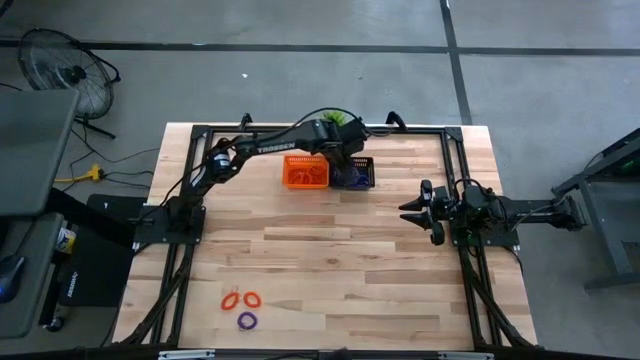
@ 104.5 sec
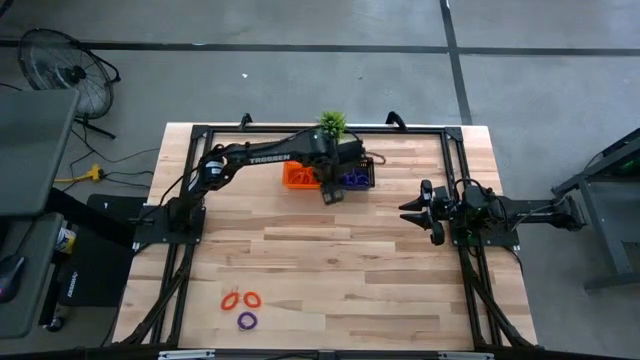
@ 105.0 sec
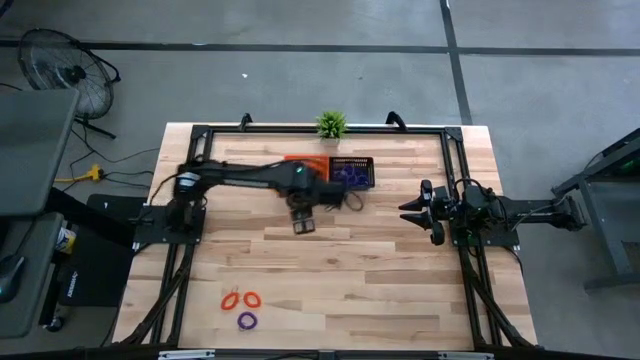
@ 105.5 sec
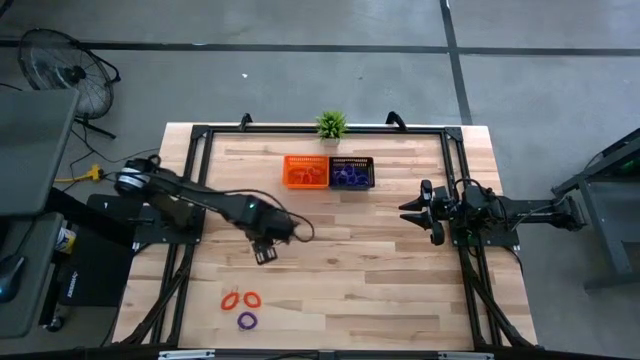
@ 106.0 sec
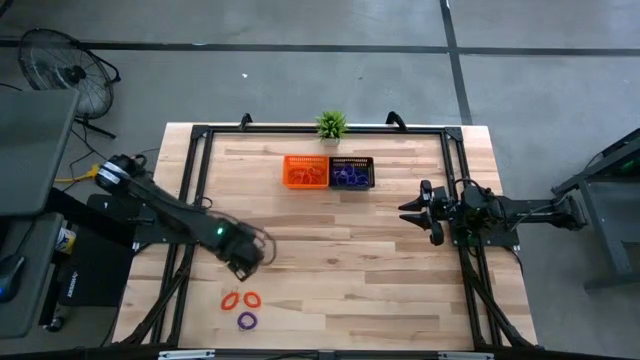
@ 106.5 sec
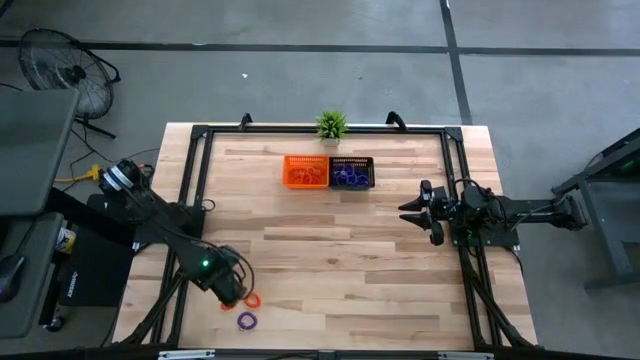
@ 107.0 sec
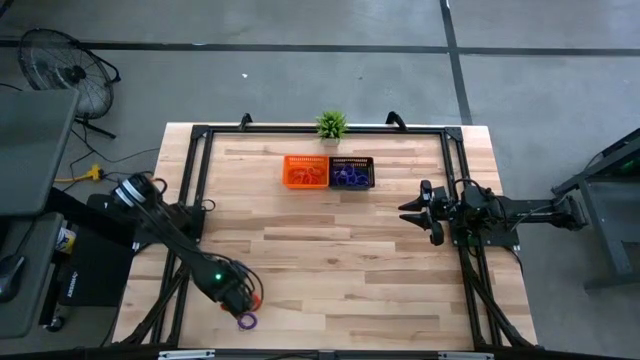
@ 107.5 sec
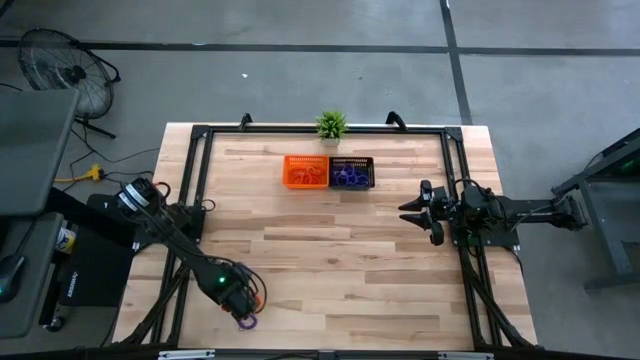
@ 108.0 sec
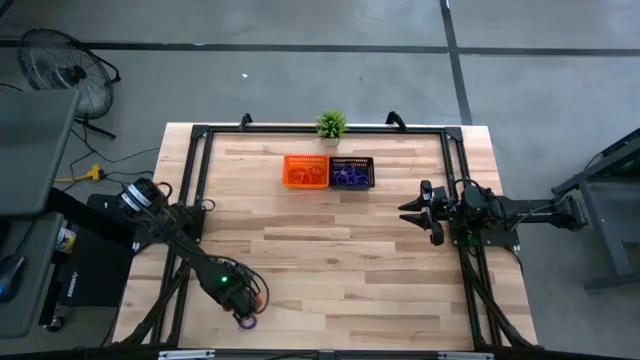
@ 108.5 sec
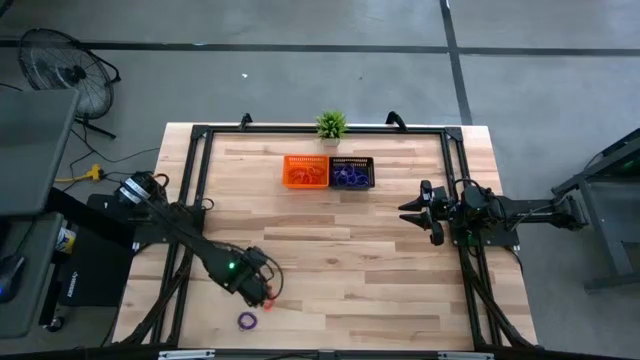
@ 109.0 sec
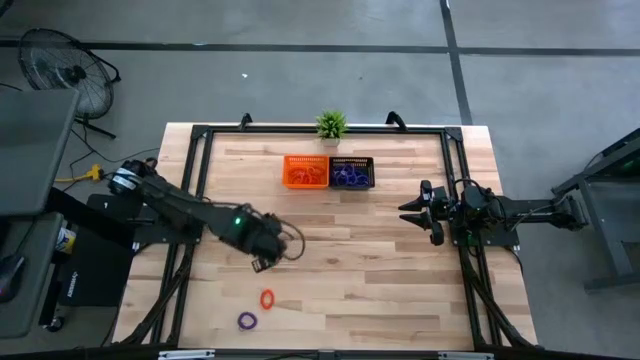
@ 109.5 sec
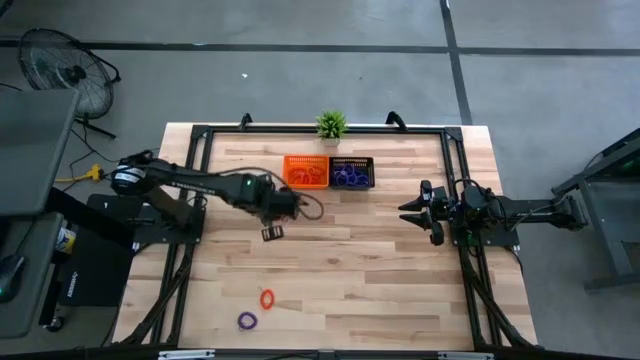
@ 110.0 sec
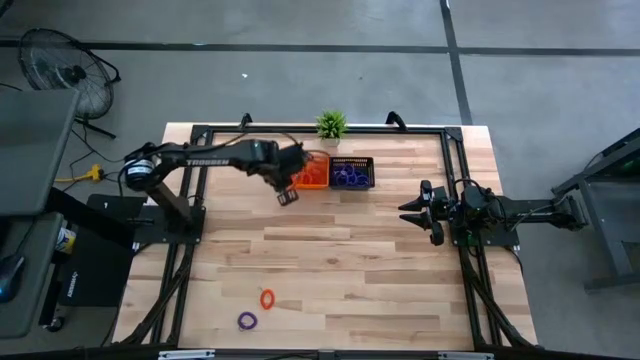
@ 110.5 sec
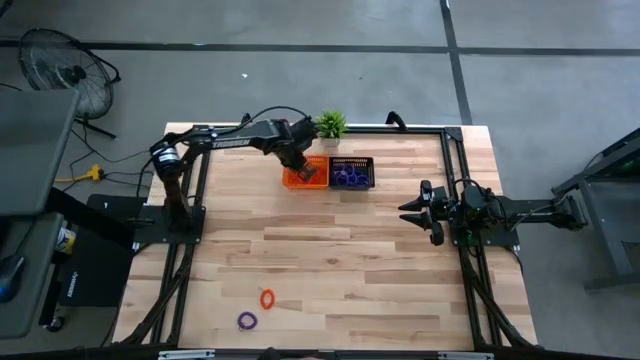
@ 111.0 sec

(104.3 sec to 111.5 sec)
Task: Sort spring keychains into baskets
Put the orange spring keychain into the orange basket

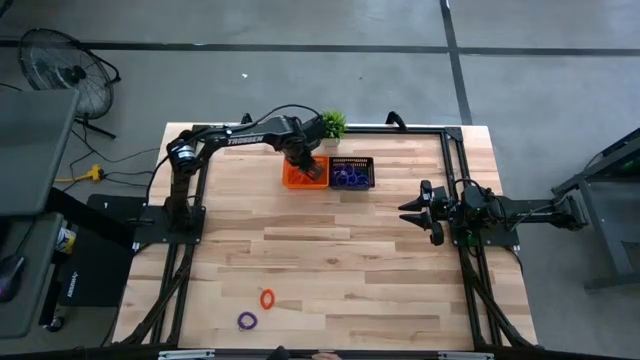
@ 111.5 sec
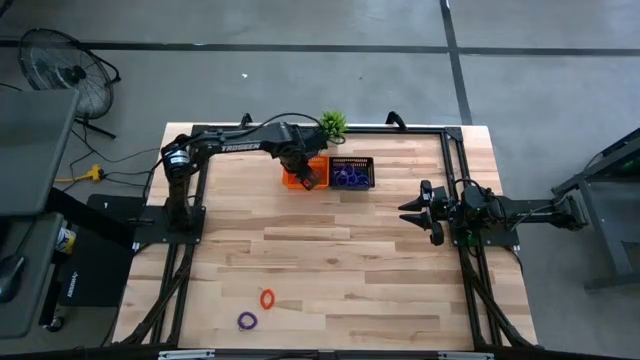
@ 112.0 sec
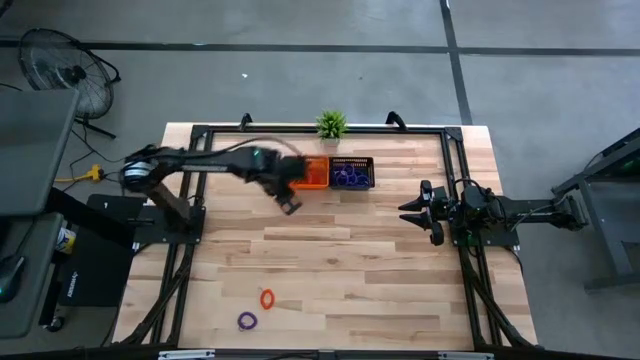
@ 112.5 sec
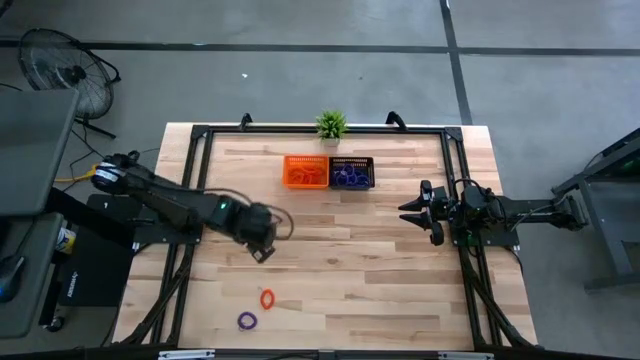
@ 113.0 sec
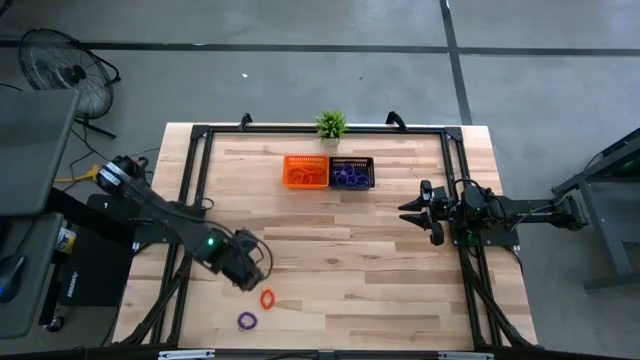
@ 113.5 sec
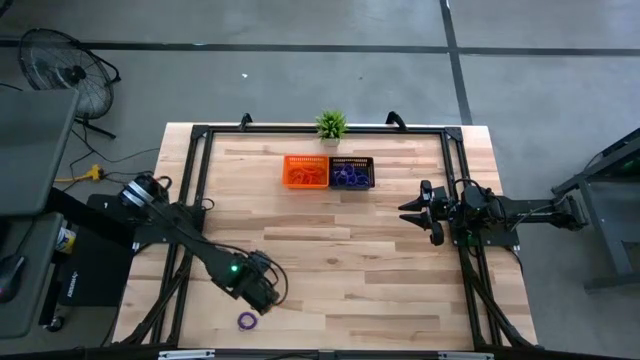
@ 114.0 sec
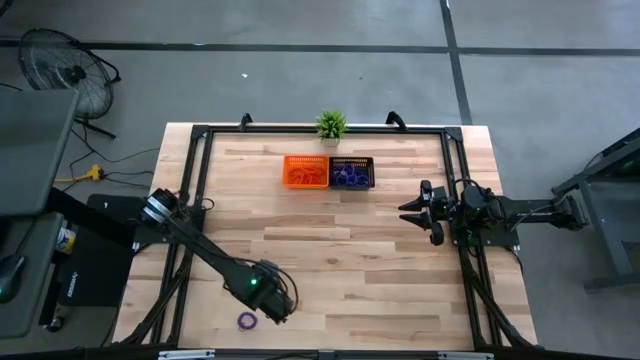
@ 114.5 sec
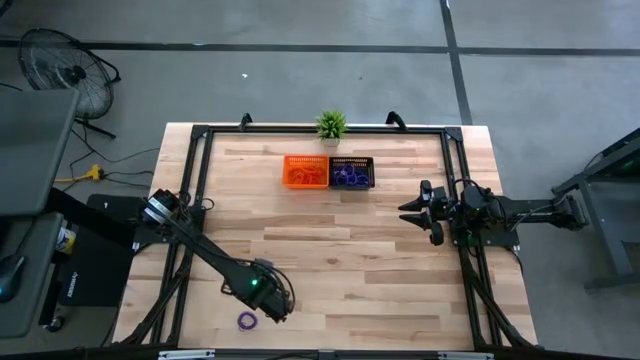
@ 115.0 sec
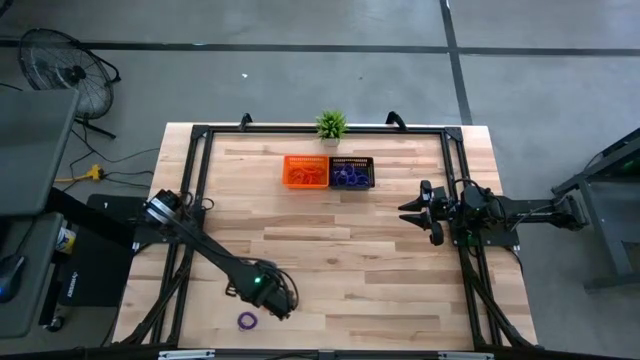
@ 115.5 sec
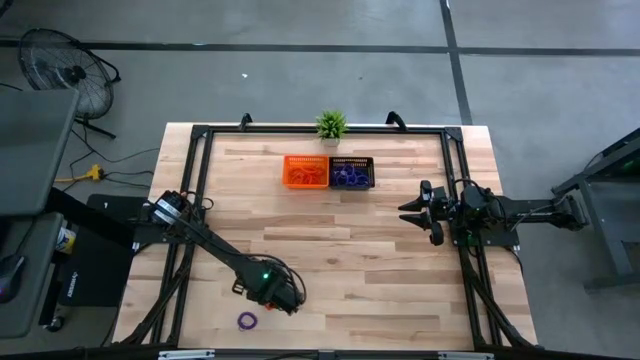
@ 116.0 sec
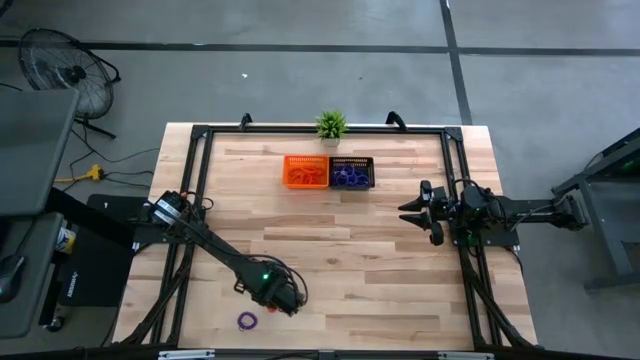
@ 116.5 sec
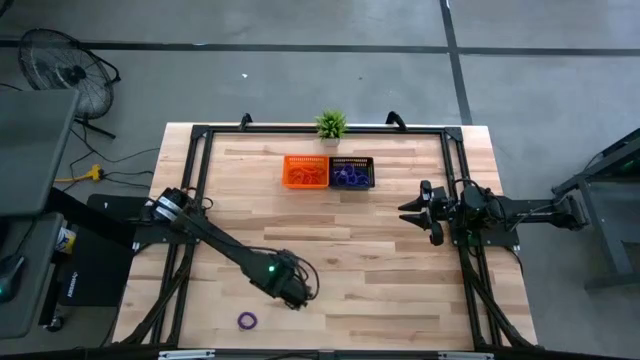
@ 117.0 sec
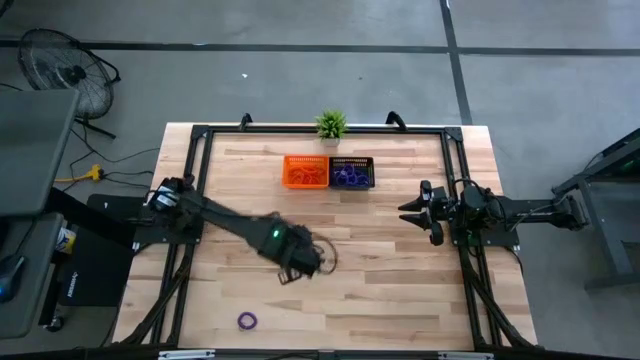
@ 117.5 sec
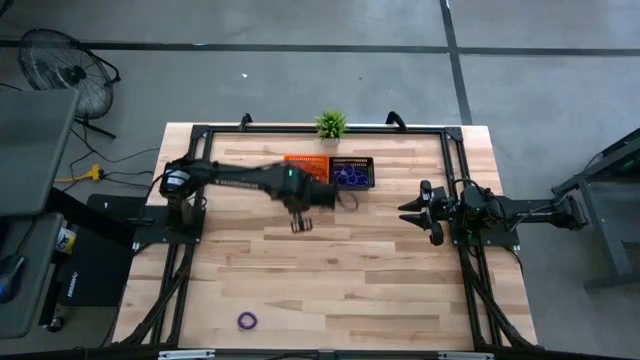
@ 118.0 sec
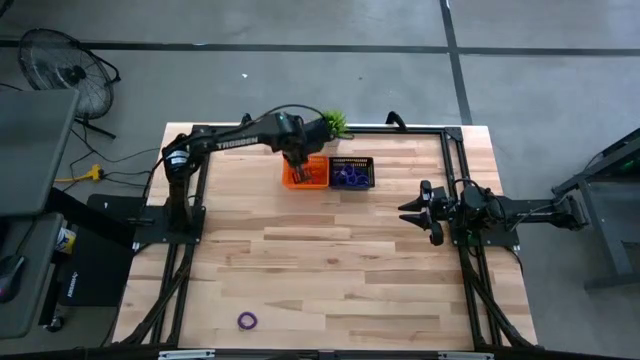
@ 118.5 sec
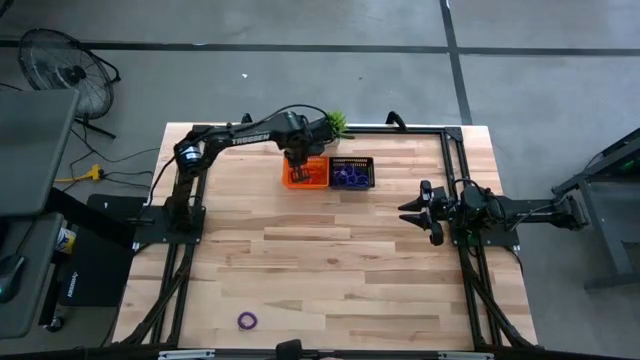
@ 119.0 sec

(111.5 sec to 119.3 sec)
Put the orange spring keychain into the orange basket

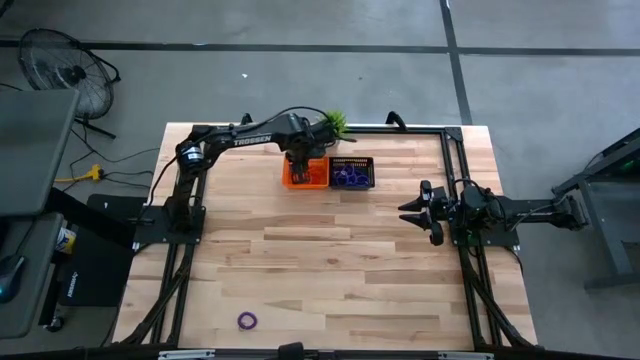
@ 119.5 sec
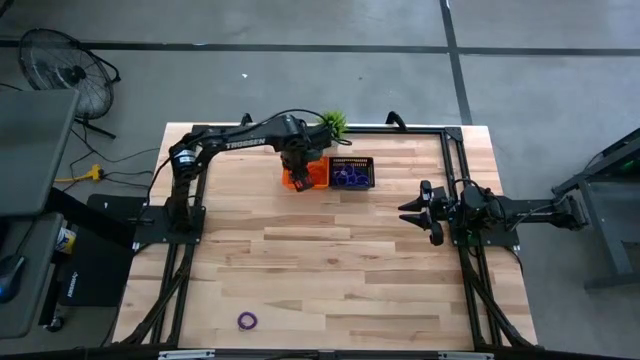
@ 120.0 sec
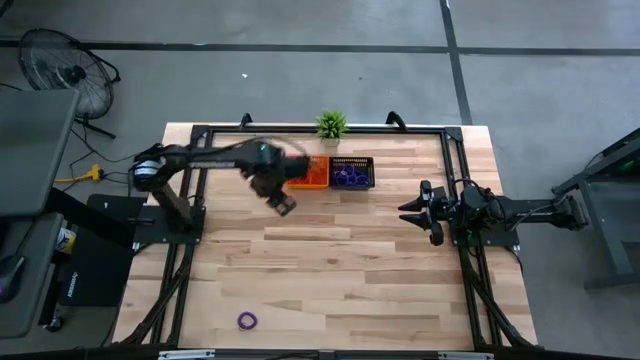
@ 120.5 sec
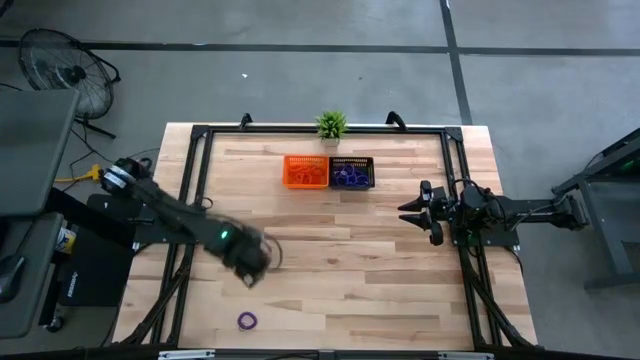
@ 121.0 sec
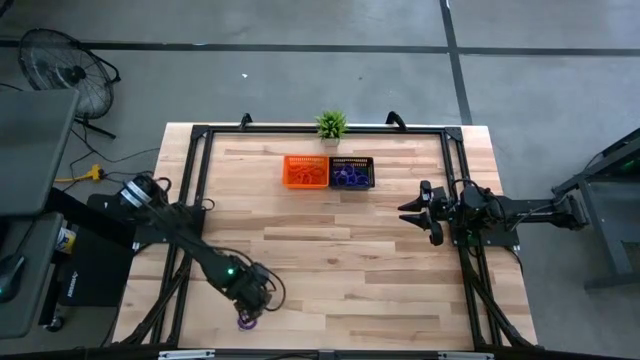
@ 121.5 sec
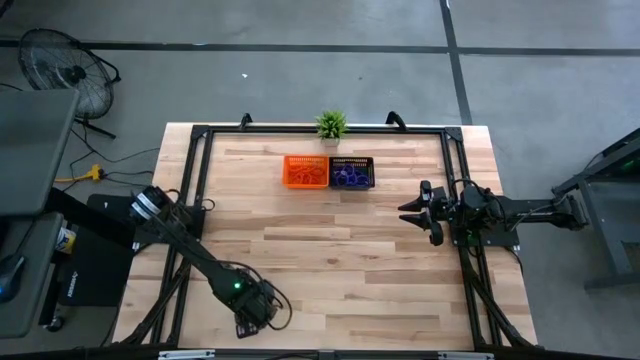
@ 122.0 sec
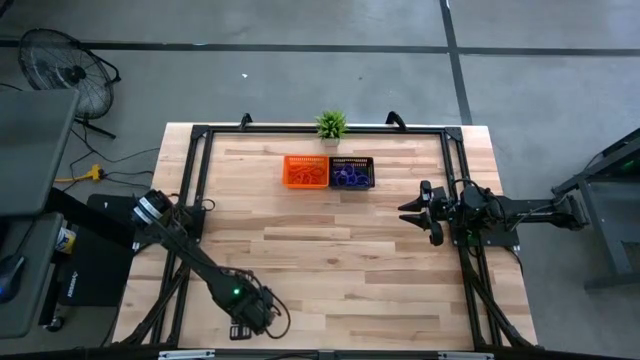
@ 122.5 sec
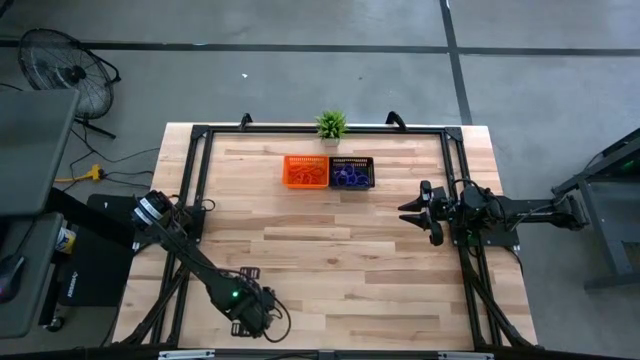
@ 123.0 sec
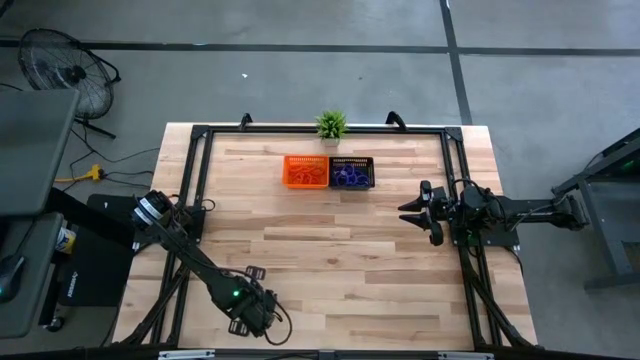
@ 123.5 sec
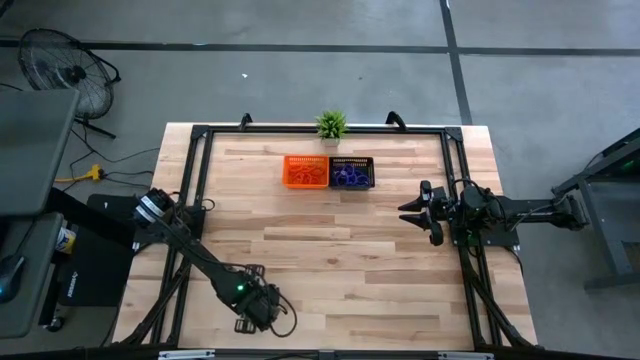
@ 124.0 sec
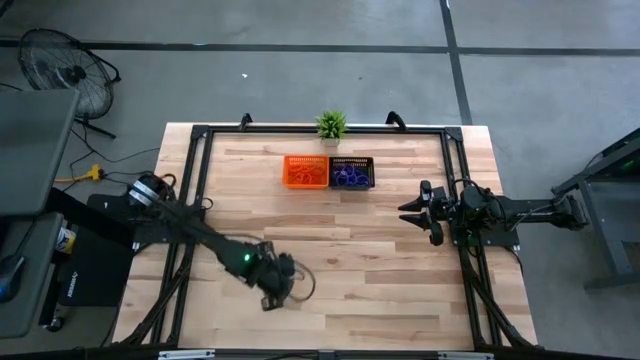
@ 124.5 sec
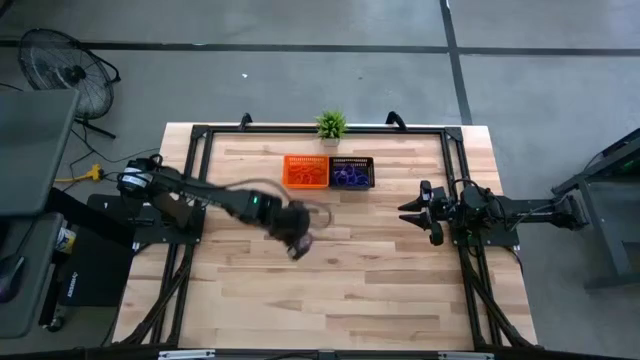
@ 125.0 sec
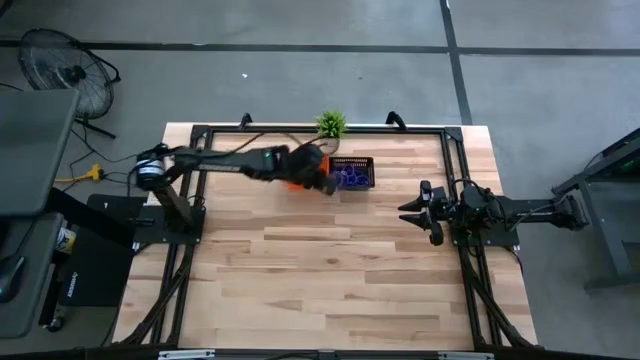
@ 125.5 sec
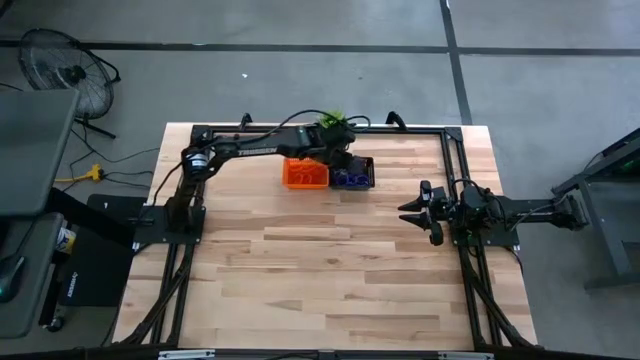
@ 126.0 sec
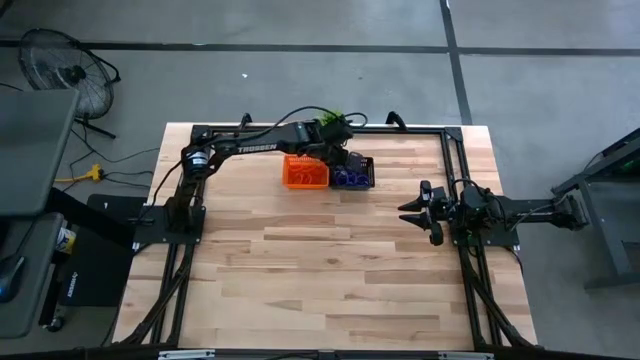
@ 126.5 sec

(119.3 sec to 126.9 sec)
Put the purple spring keychain into the black basket
